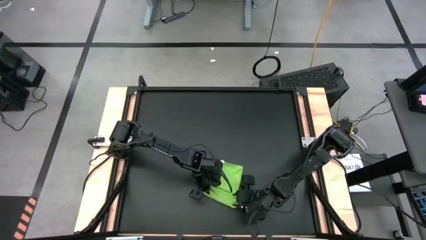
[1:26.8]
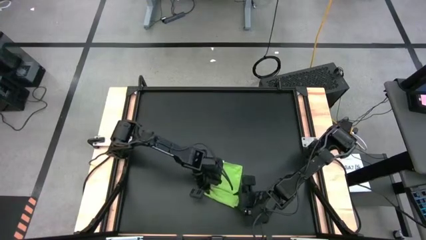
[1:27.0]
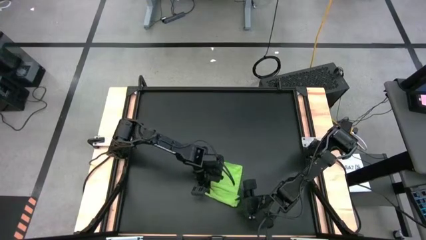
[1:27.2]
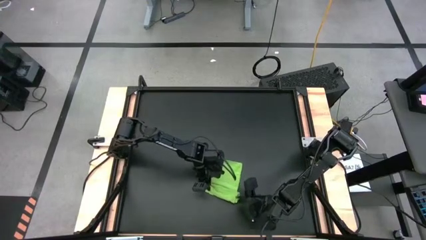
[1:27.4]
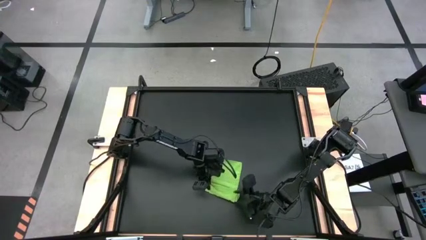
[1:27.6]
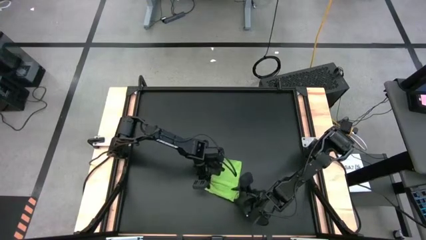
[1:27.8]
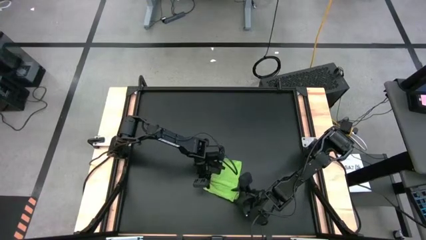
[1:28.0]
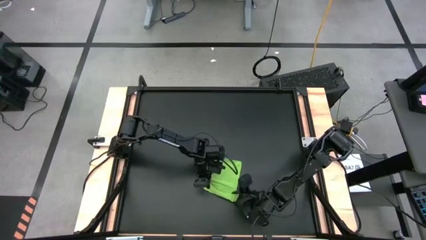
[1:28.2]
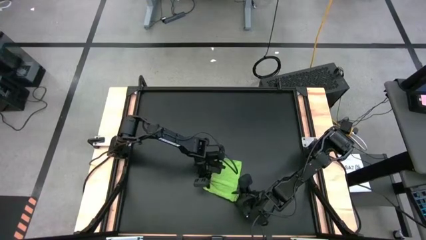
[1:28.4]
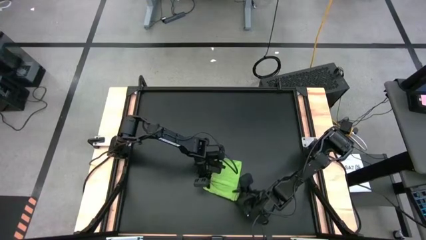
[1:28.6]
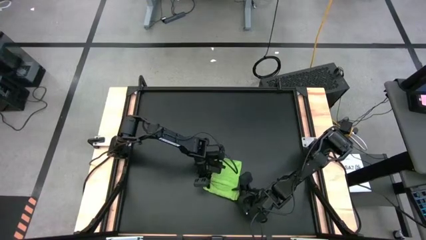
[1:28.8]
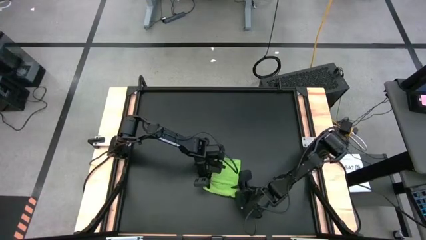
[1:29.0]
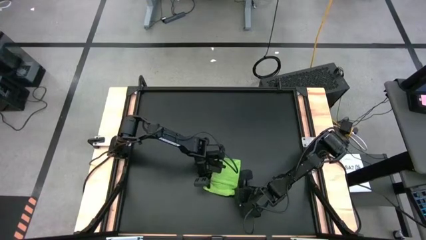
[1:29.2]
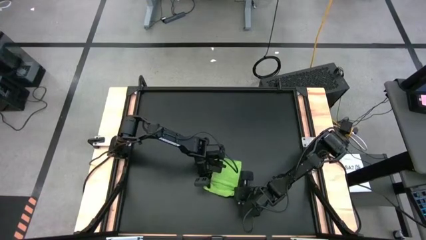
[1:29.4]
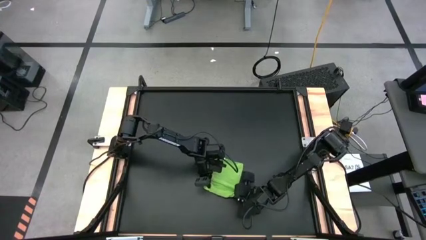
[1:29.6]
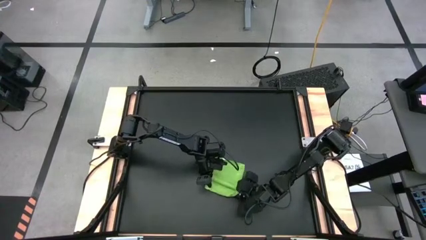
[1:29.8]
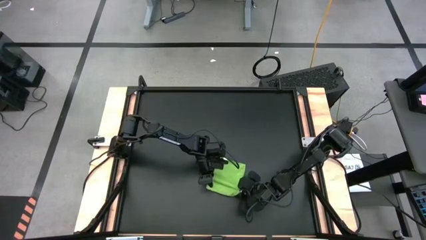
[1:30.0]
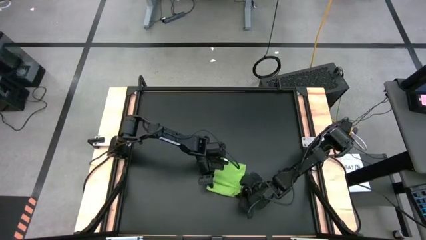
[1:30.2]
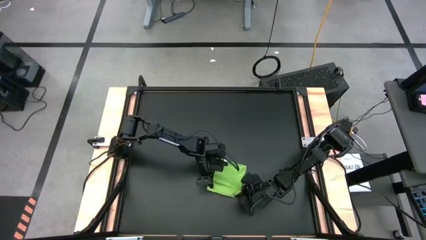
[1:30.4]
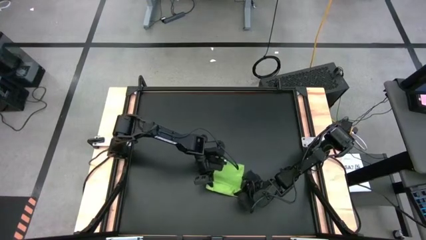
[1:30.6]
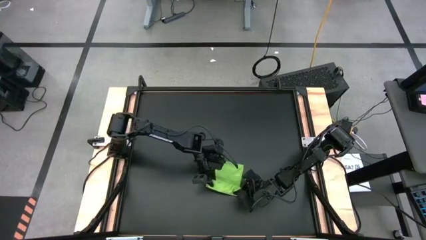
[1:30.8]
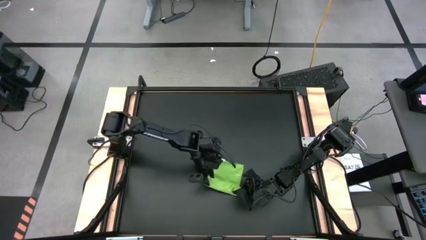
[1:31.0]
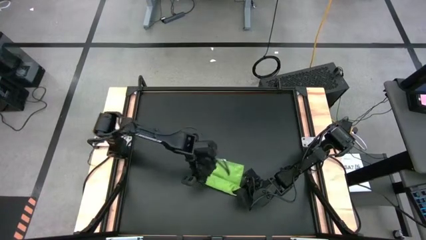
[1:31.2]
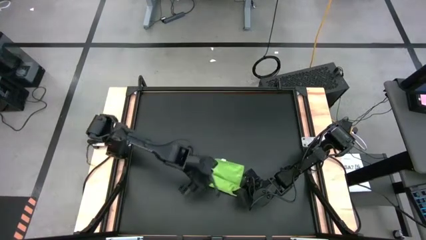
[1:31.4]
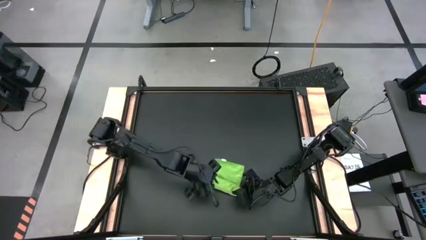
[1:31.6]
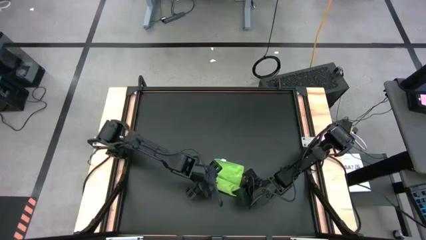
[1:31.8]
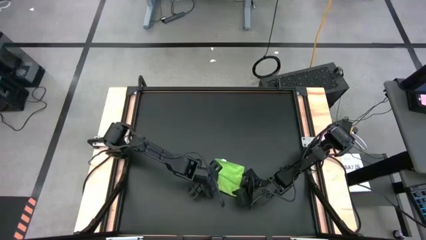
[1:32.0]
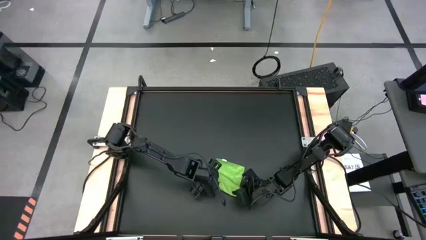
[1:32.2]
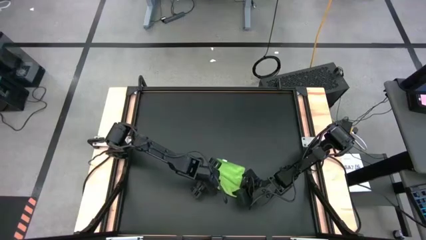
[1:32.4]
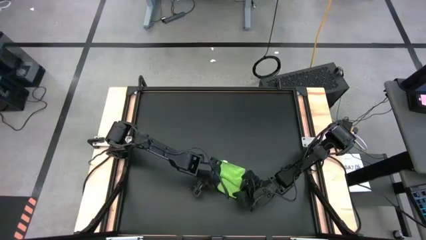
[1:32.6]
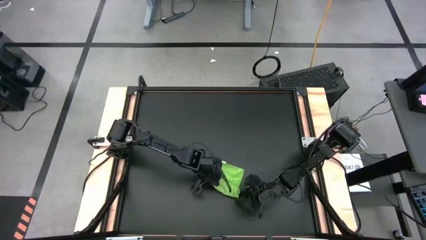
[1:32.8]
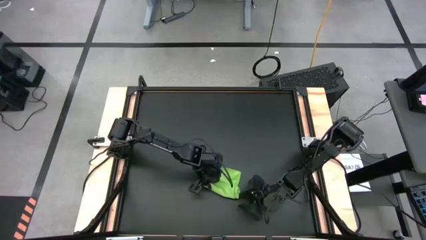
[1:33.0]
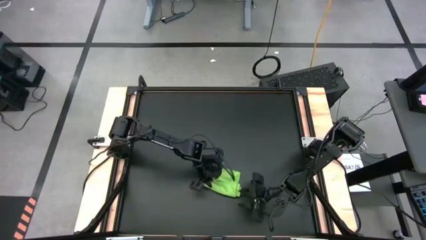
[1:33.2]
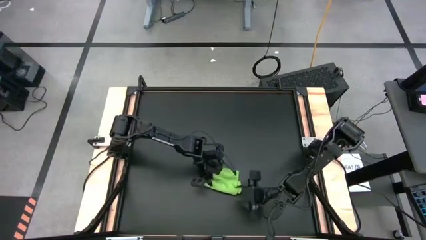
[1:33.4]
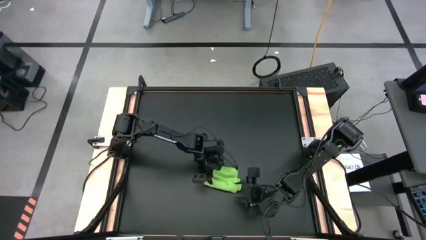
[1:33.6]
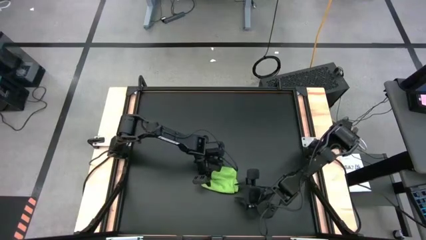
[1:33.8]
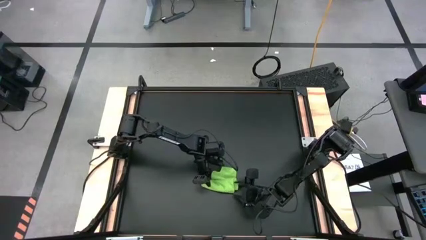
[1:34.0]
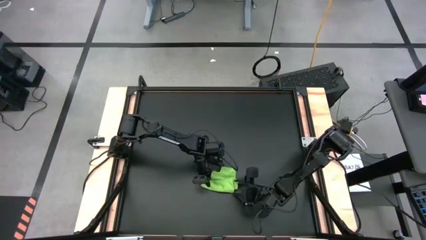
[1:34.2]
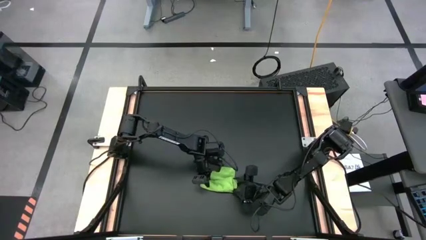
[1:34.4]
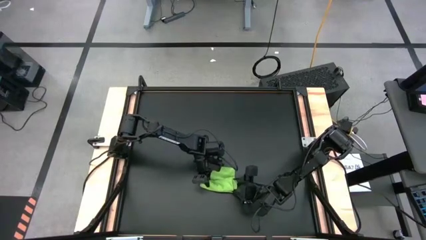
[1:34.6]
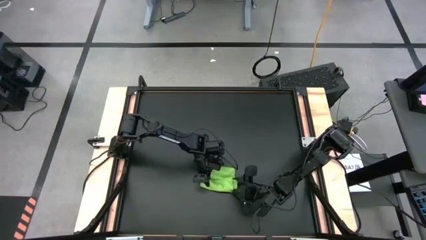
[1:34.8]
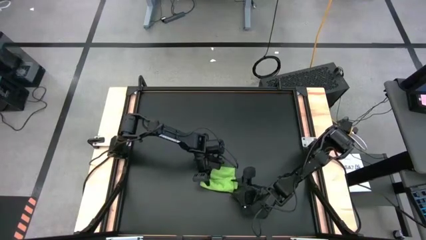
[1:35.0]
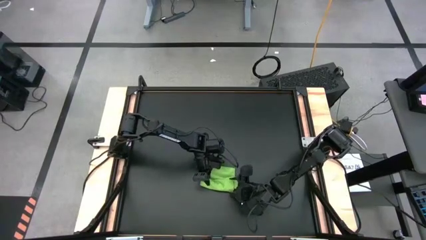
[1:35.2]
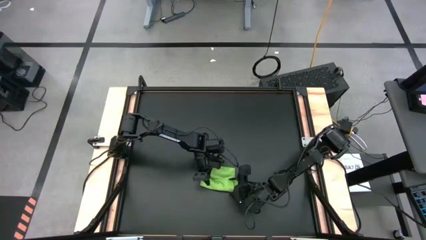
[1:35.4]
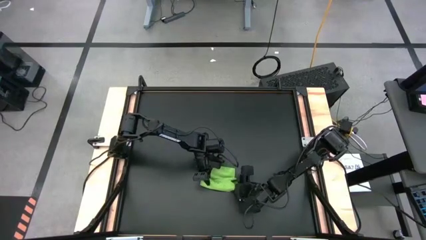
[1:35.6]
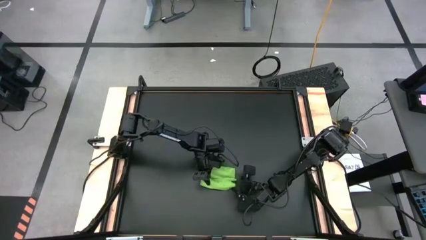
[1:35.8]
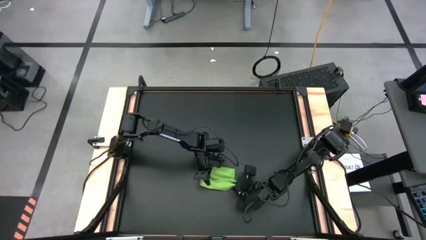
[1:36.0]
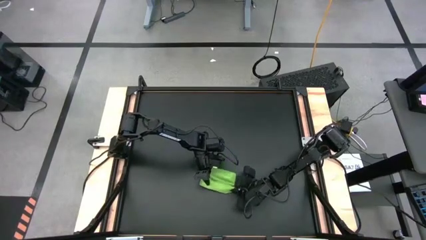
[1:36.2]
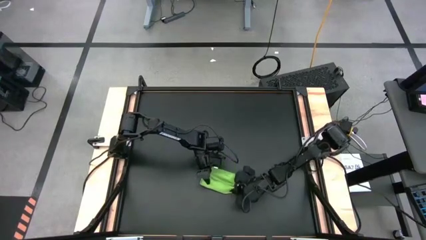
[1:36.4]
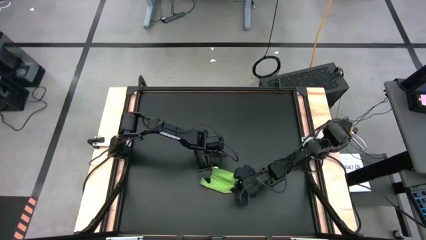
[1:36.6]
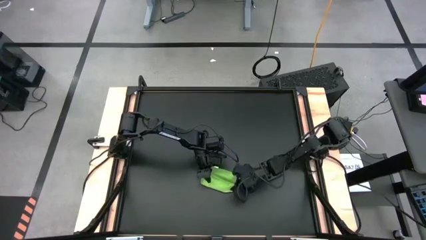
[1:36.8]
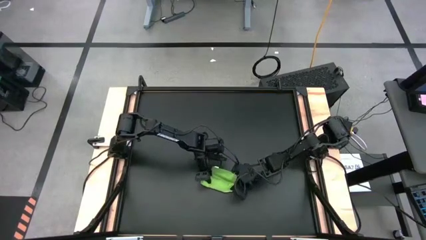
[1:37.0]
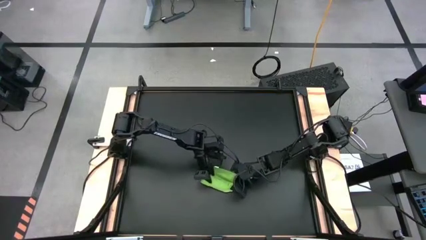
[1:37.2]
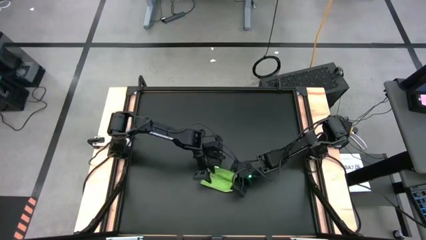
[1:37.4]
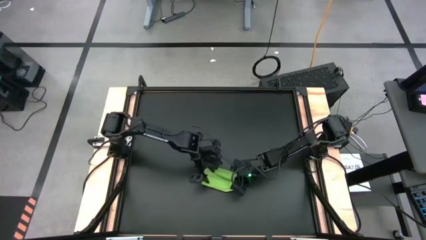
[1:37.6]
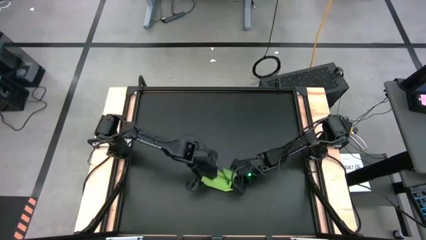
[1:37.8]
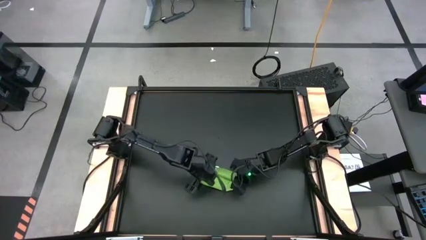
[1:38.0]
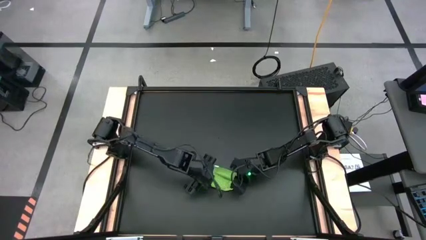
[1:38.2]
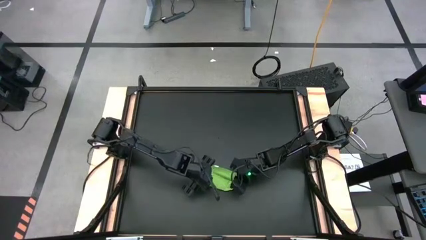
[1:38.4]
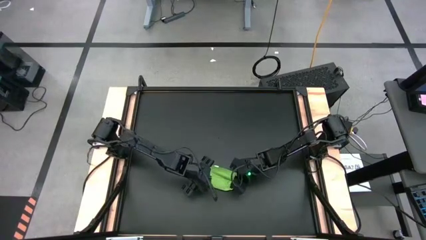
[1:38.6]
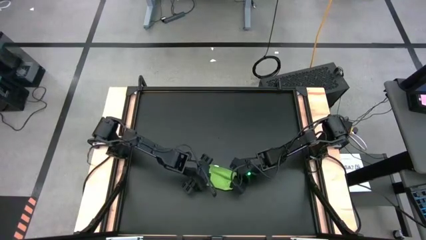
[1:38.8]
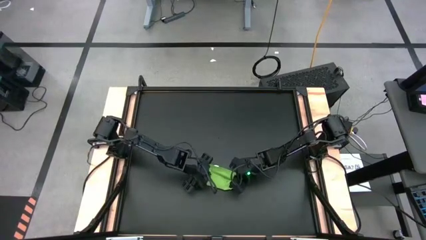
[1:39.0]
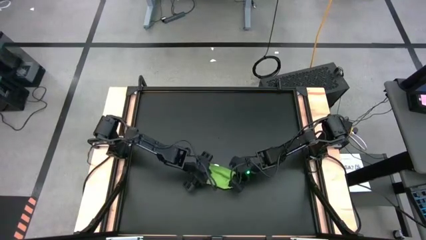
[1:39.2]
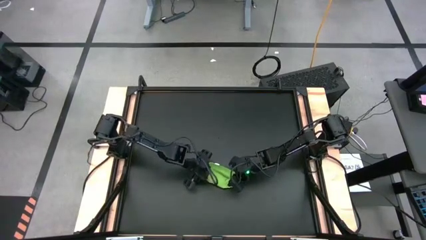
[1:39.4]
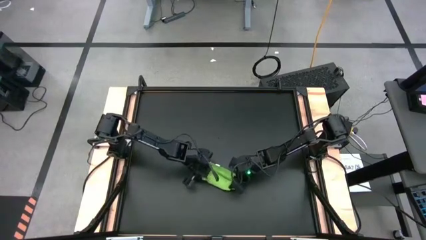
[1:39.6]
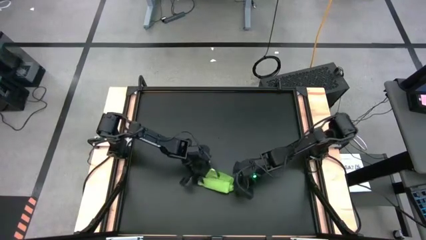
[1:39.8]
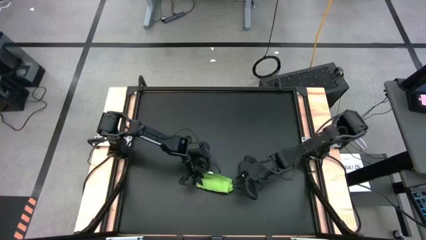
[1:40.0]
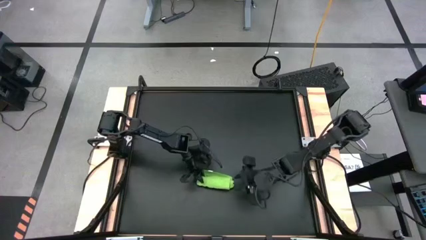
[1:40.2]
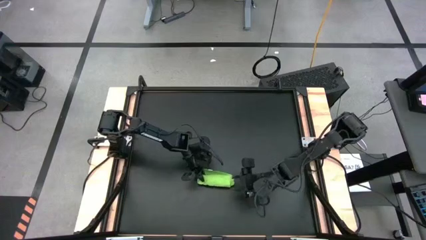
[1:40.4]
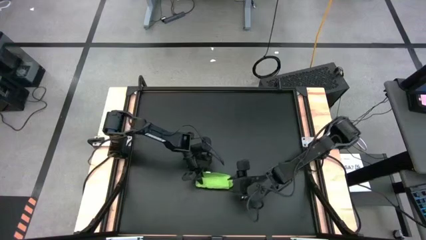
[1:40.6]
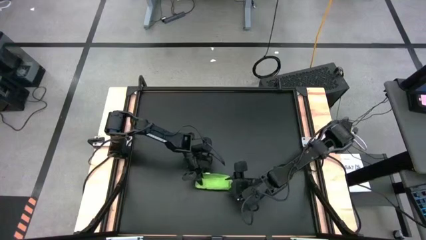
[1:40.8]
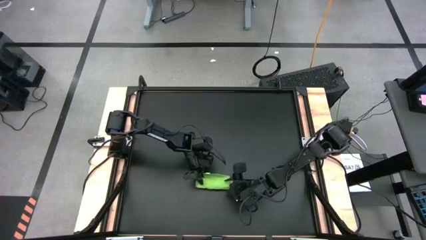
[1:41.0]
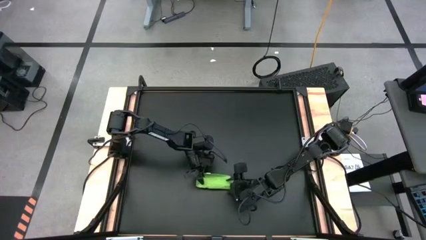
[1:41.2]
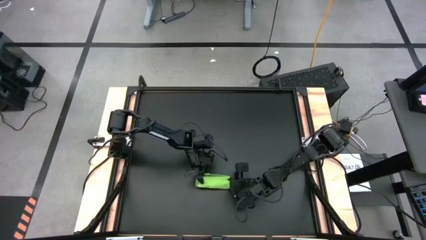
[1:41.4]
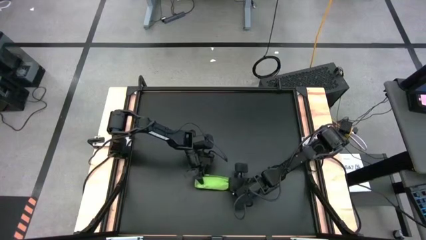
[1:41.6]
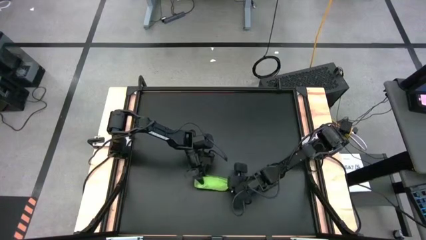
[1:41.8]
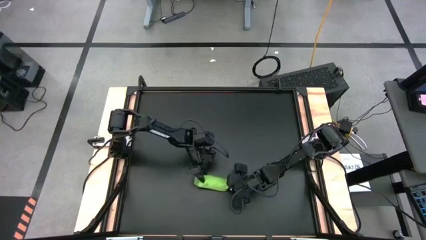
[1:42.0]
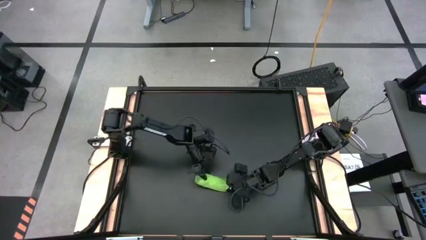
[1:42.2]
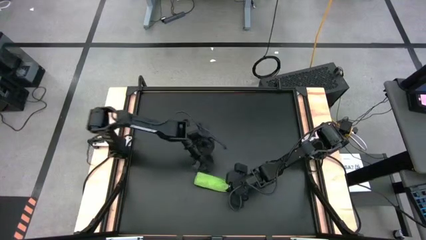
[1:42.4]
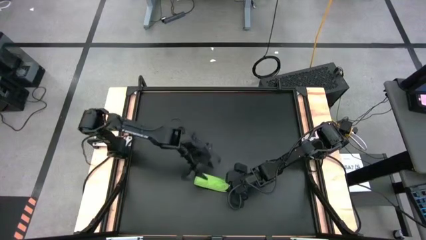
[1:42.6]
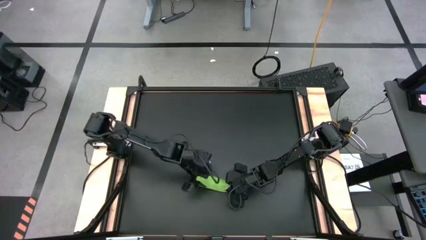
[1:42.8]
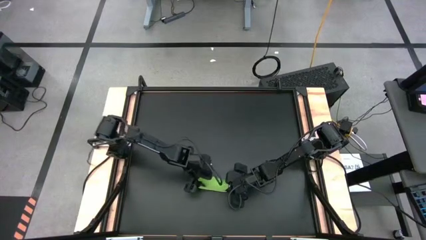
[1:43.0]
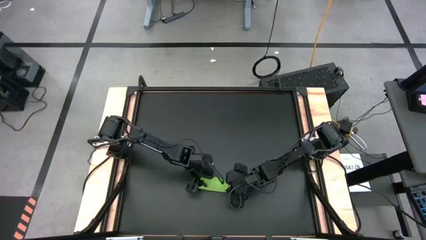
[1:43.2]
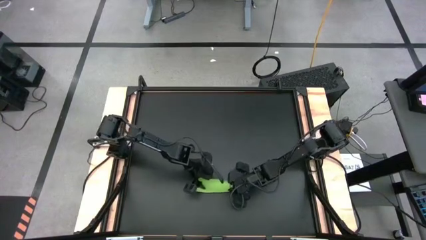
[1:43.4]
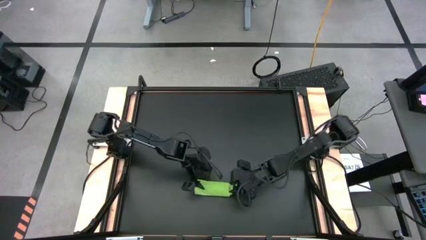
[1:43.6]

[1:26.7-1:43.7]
Task: Roll towel into tight, uniform cylinder
Roll the green towel
